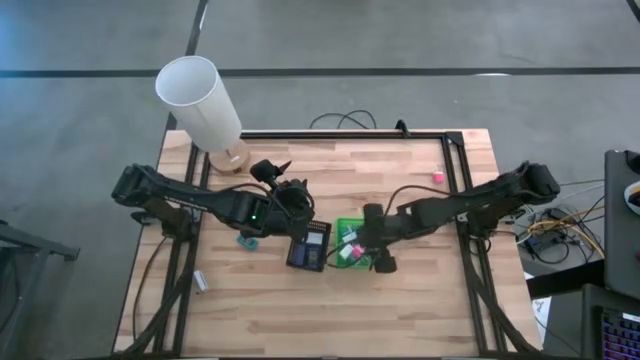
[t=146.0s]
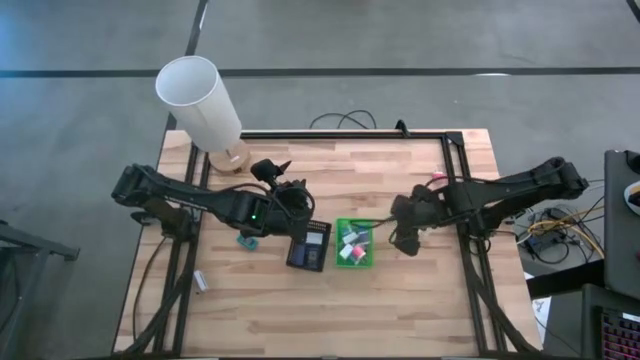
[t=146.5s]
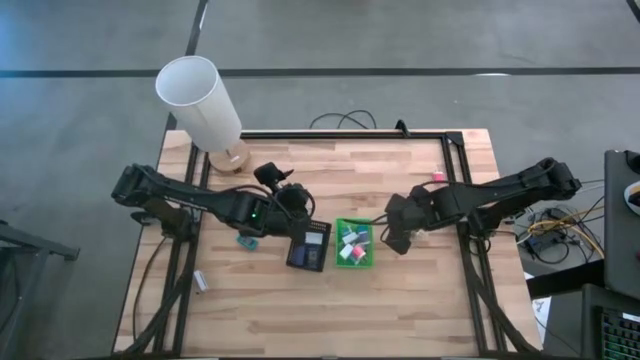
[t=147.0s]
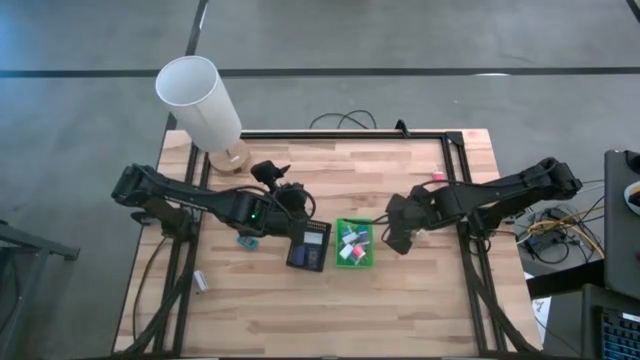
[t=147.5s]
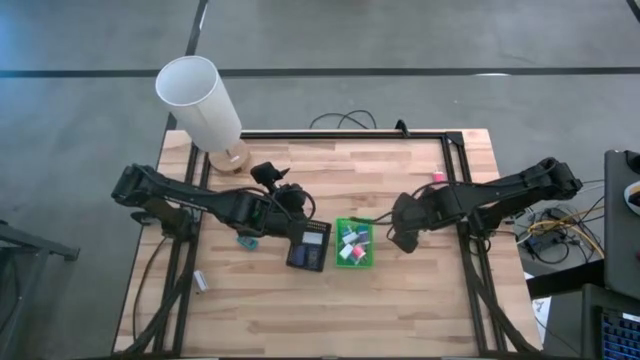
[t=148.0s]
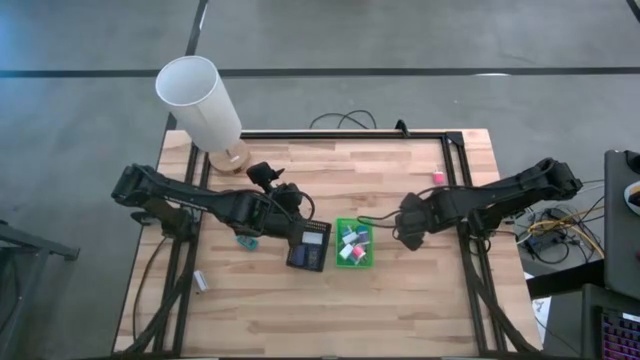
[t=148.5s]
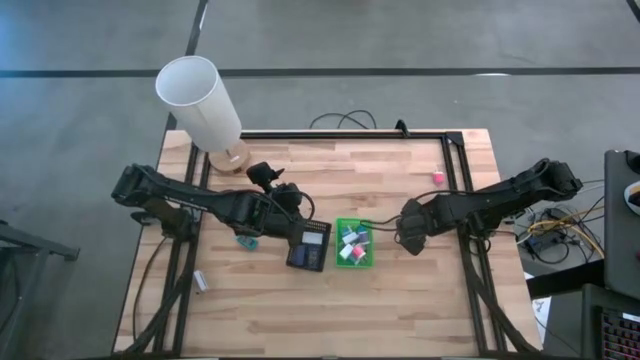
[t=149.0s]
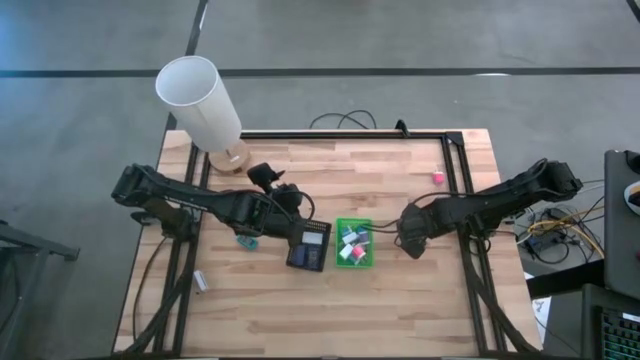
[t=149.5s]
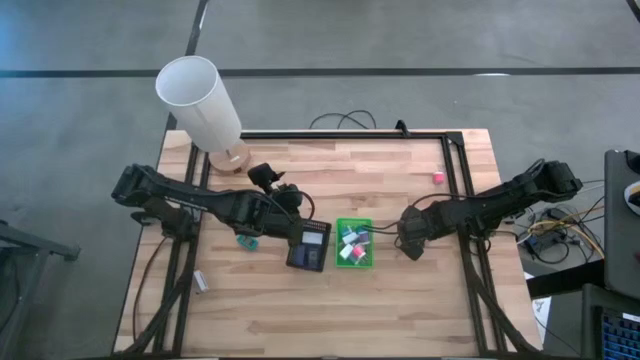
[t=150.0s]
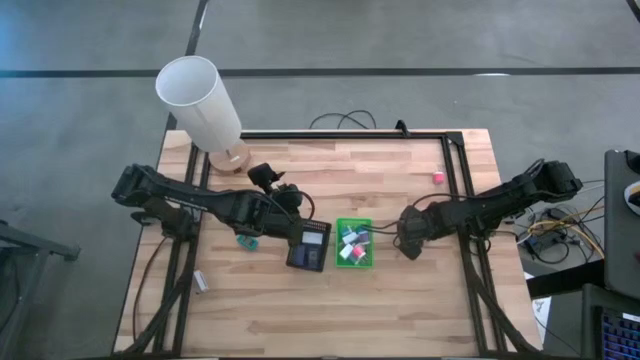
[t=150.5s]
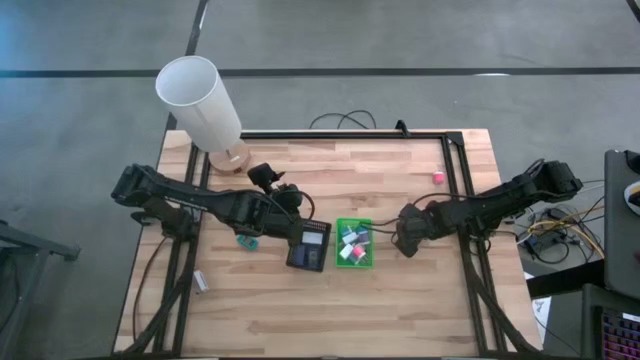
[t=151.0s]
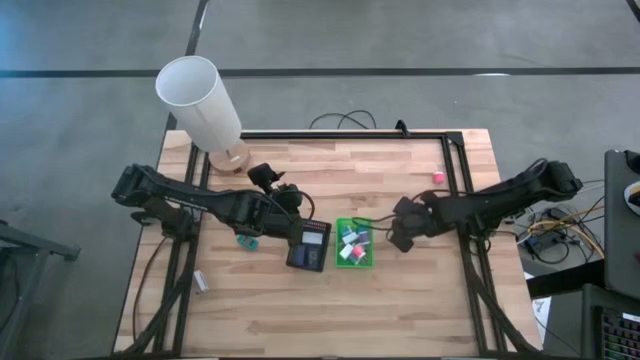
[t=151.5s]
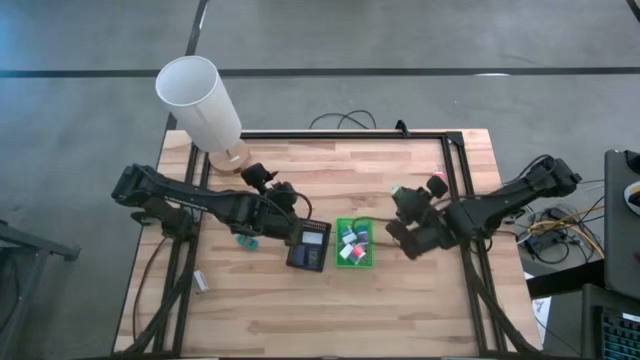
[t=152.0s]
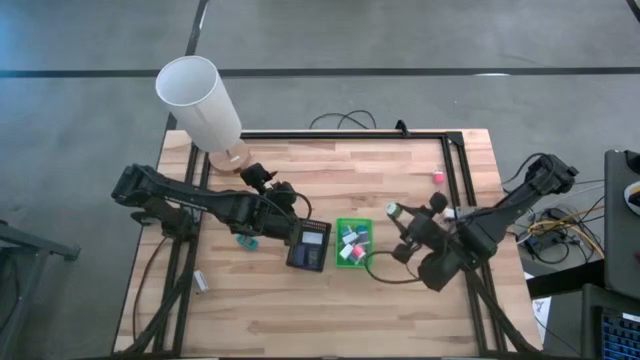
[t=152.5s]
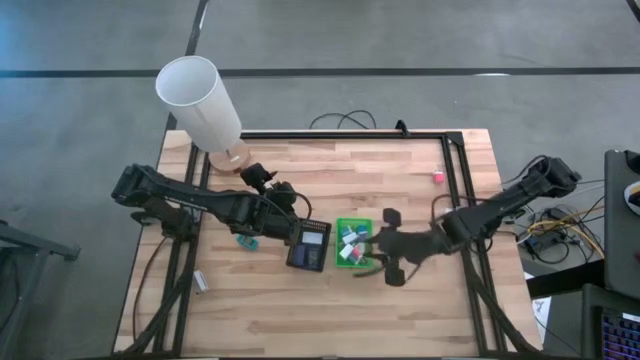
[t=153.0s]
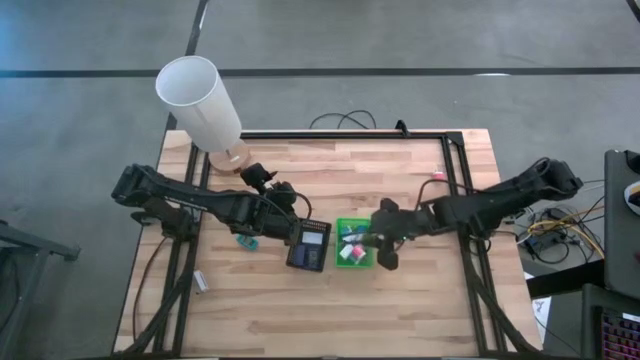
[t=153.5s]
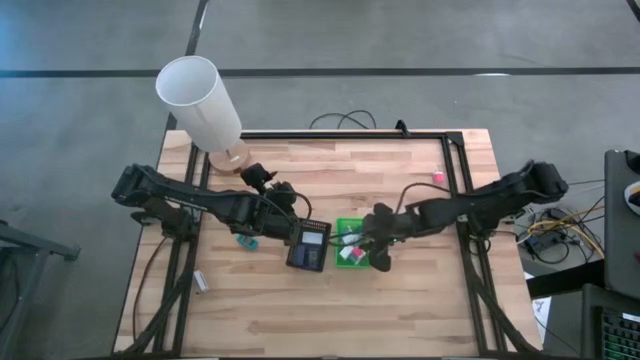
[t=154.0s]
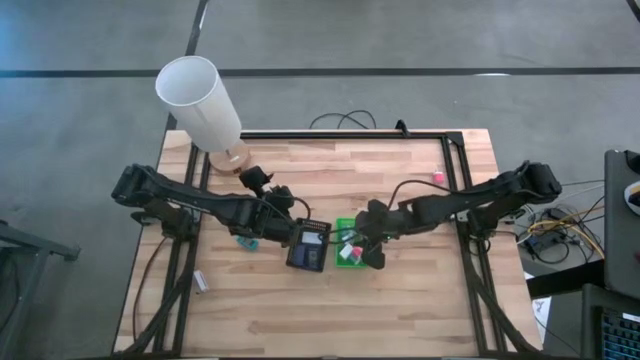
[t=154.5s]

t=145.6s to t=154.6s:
Task: Pick & Place Office items
Put the green charger adapter into the green basket

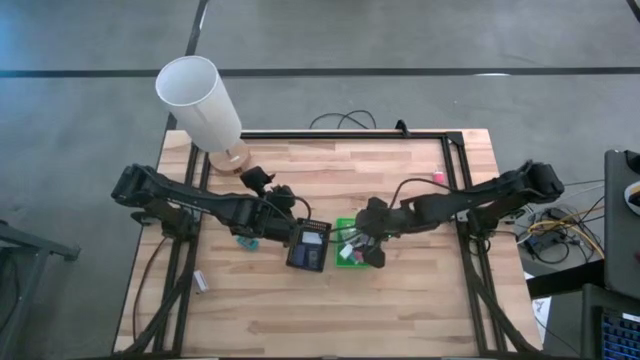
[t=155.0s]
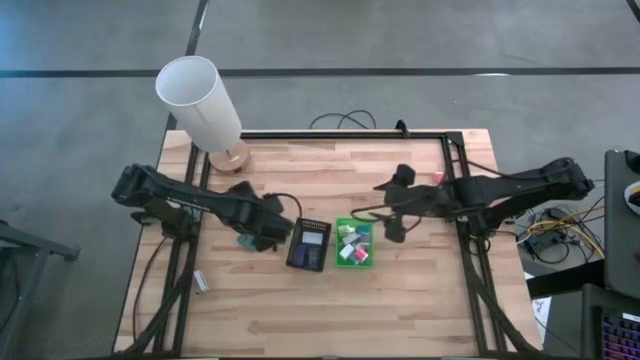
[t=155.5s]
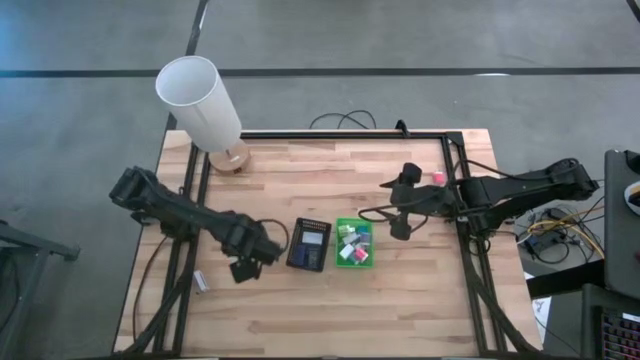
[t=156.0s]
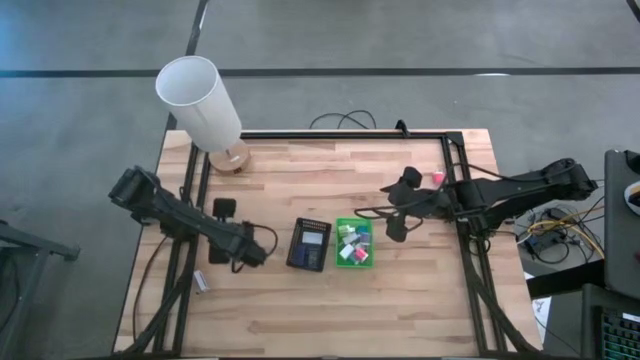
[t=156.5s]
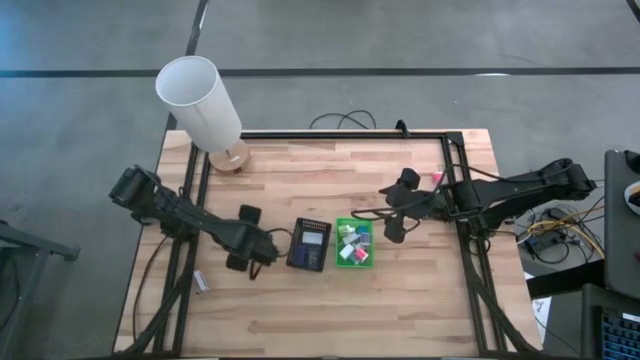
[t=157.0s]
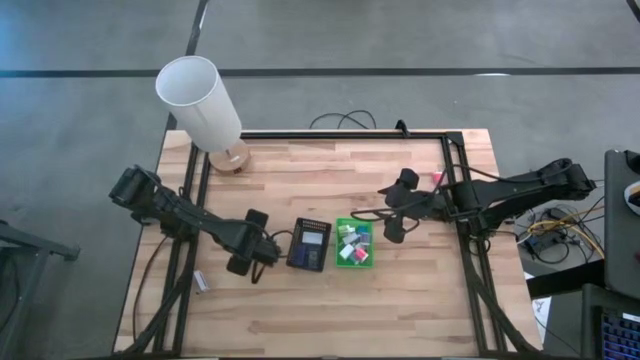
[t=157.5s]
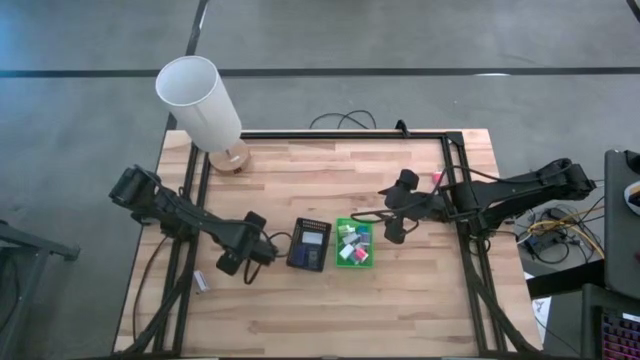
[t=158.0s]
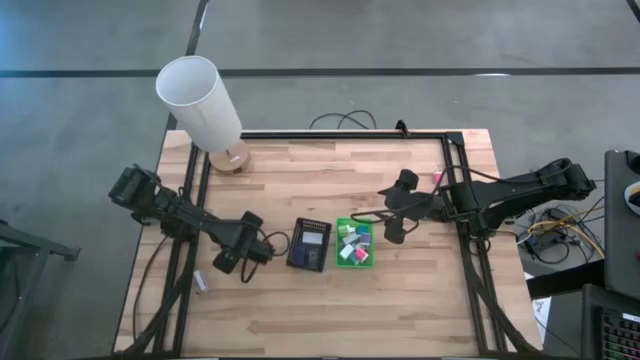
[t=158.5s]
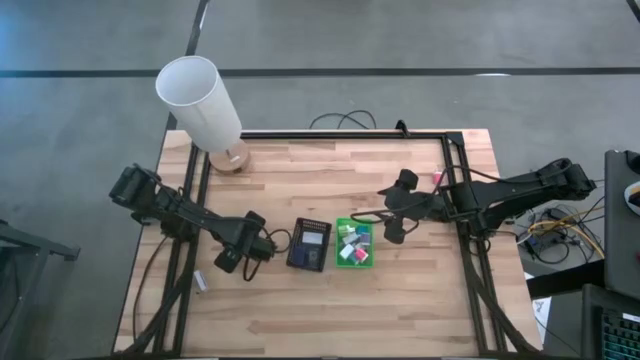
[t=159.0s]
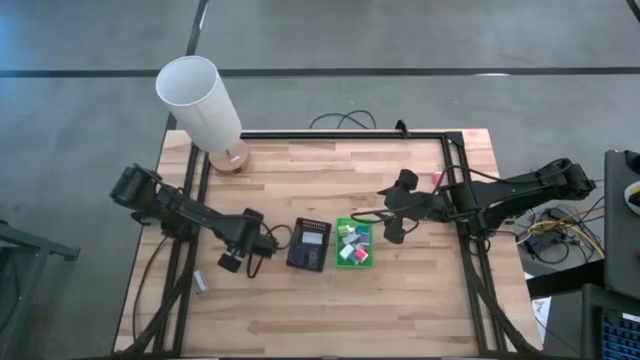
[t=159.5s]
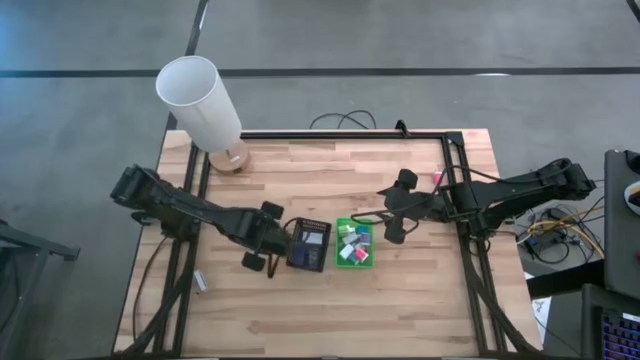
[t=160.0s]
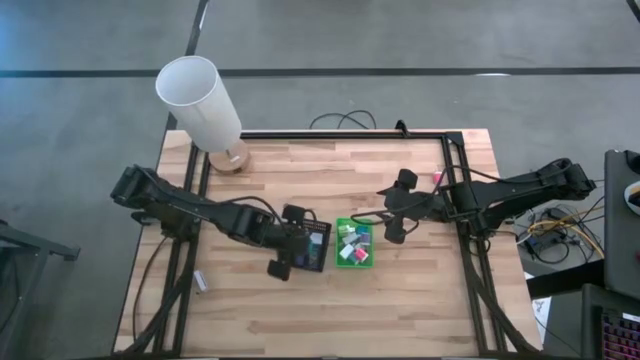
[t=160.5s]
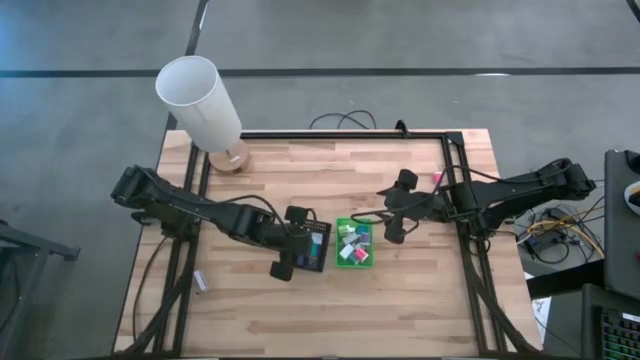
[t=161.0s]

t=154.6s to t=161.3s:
Put the blue digital clock into the black basket

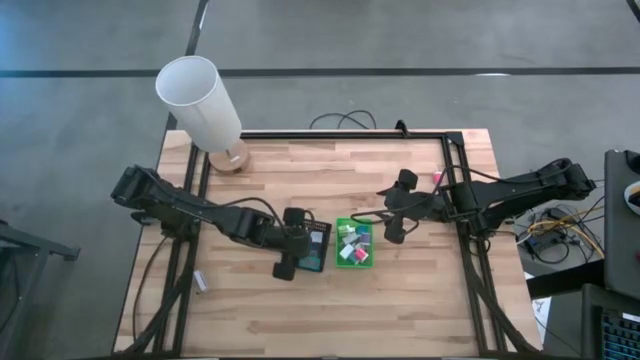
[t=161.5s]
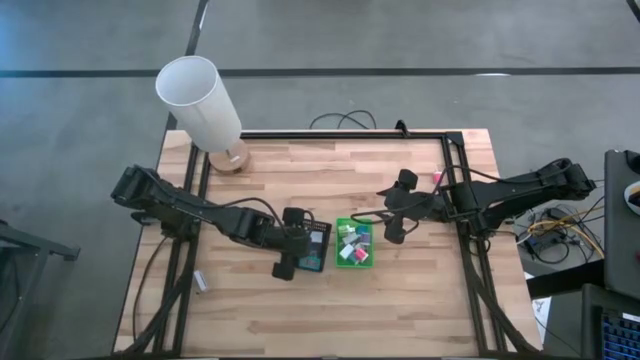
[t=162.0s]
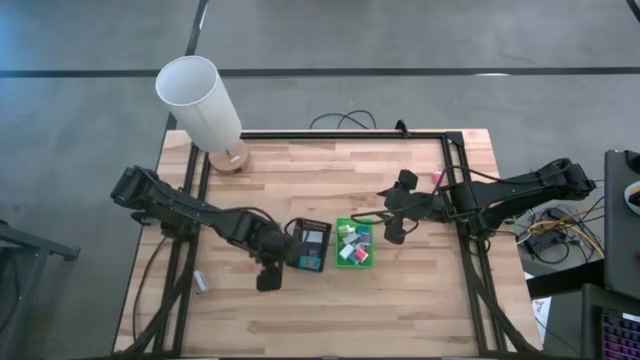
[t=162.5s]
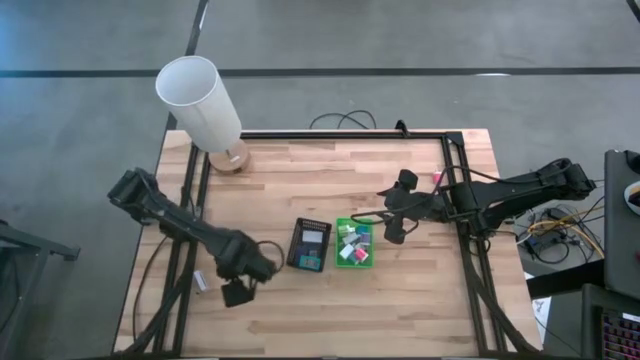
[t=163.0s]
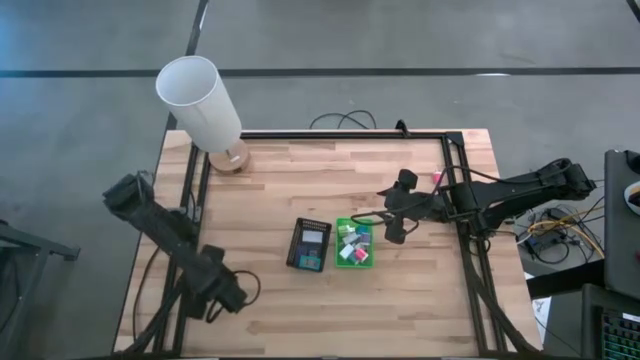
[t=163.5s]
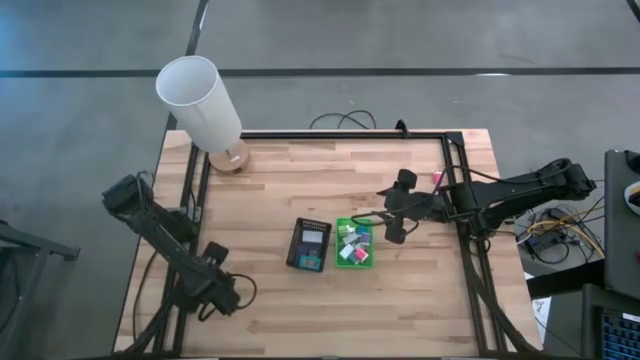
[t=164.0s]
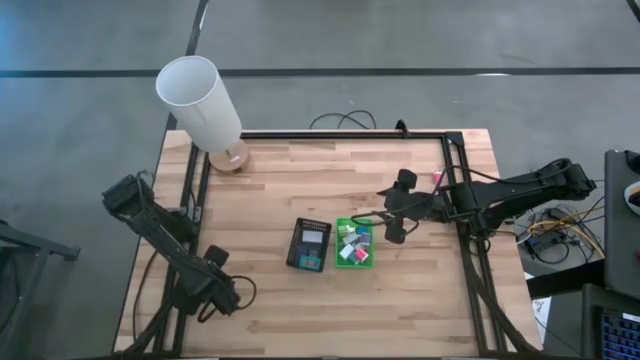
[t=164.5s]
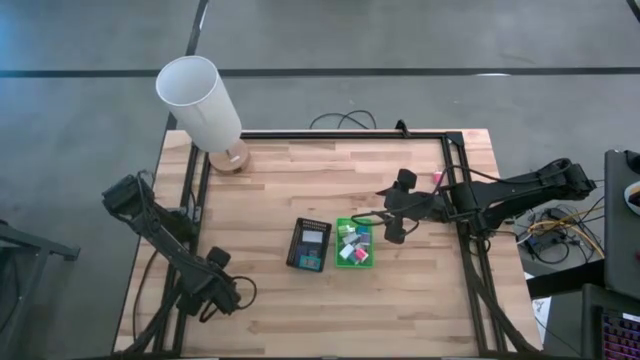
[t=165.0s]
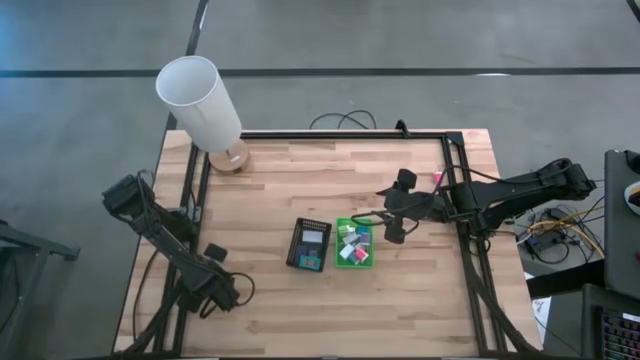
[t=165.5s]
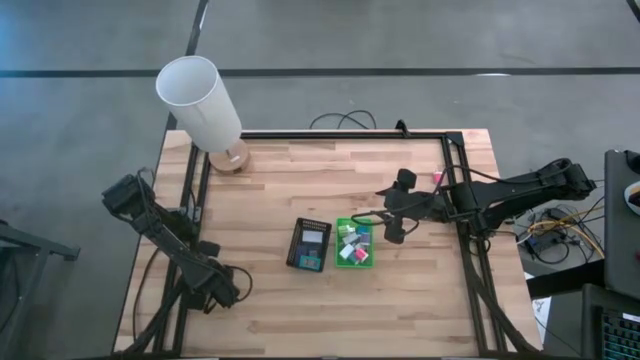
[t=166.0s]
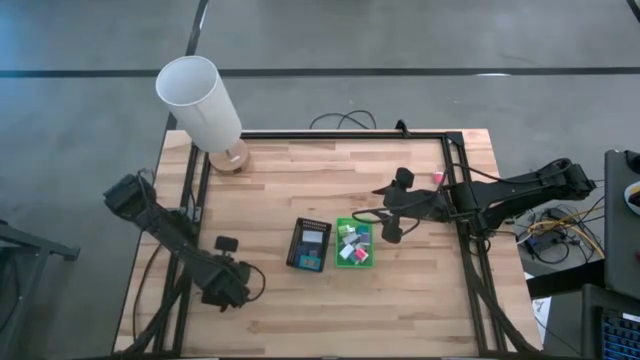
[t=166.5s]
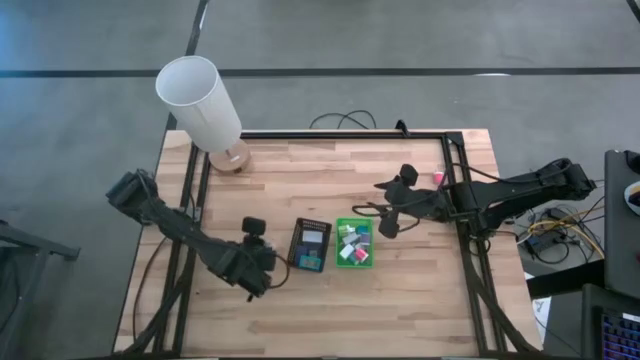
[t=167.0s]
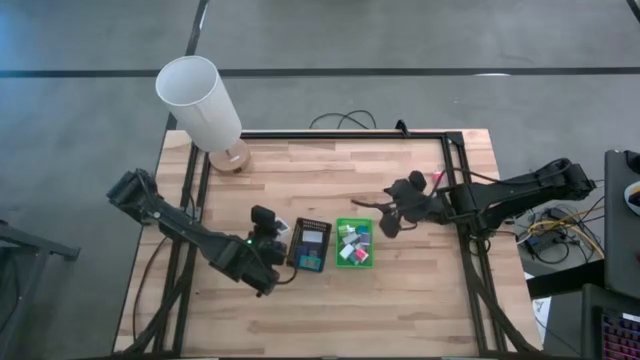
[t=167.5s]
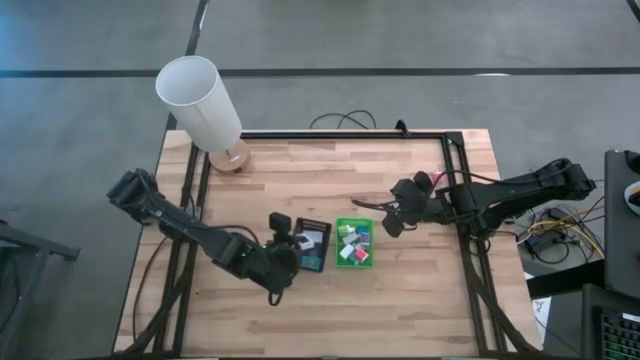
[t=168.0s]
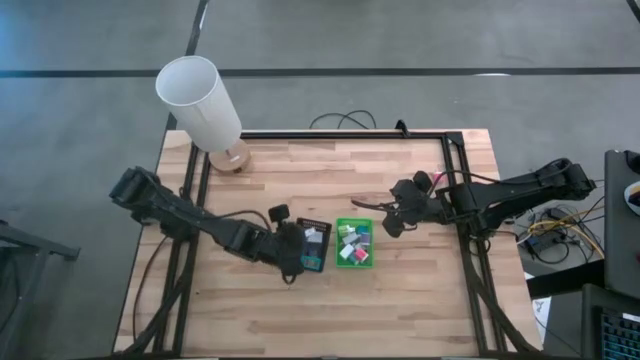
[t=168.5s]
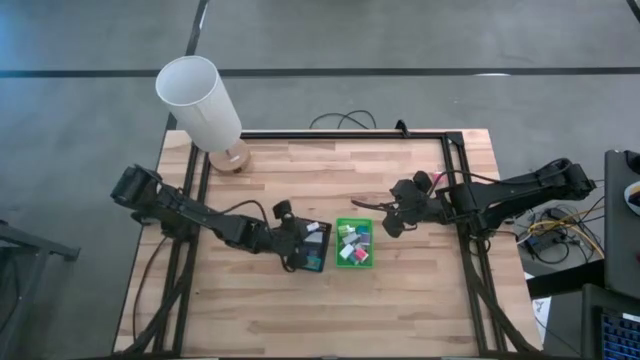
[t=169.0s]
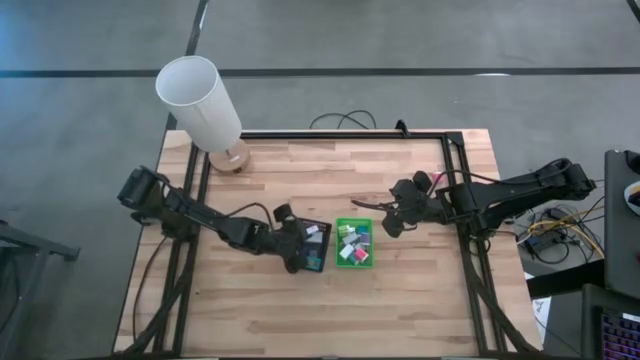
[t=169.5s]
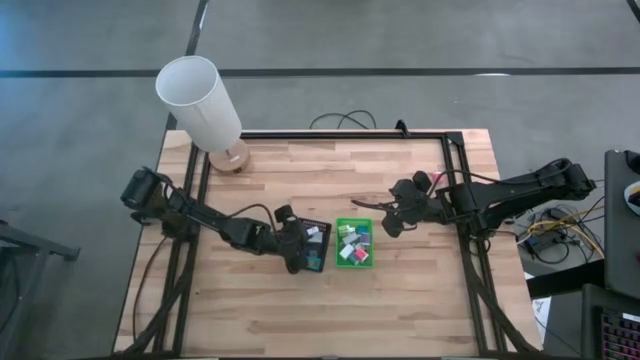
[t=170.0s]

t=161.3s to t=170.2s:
Put the white digital clock into the black basket
